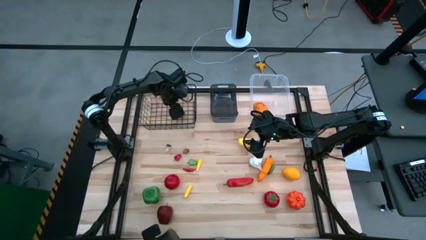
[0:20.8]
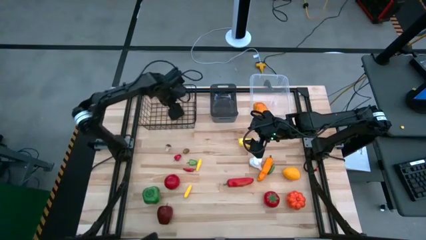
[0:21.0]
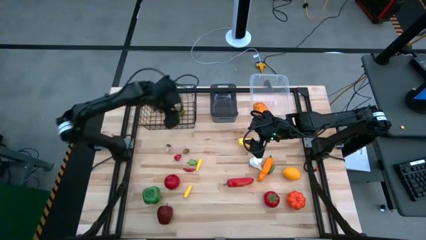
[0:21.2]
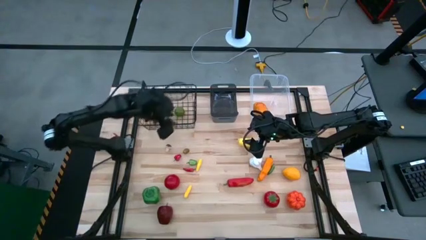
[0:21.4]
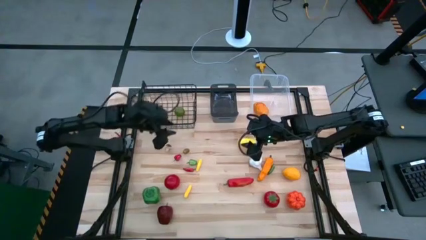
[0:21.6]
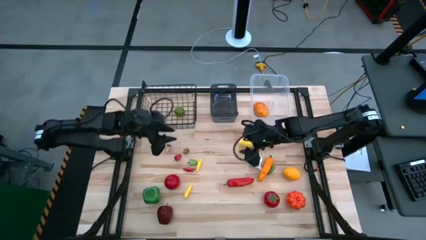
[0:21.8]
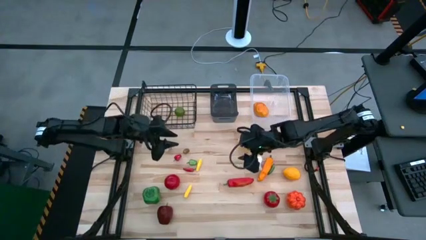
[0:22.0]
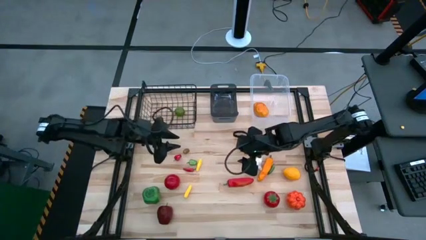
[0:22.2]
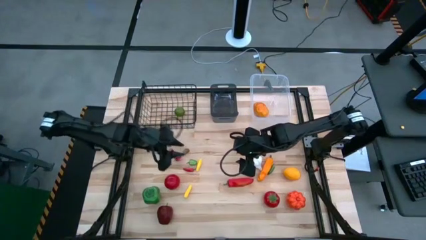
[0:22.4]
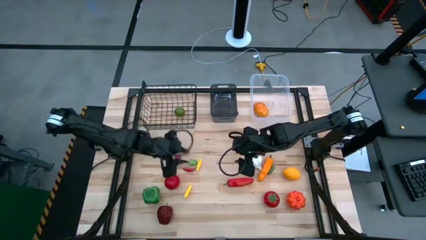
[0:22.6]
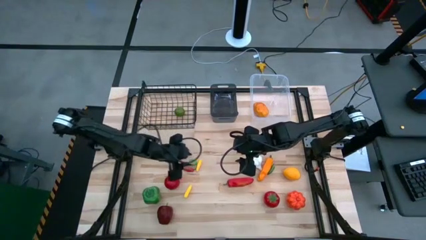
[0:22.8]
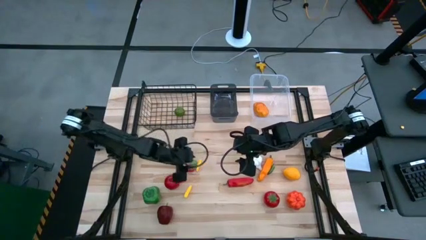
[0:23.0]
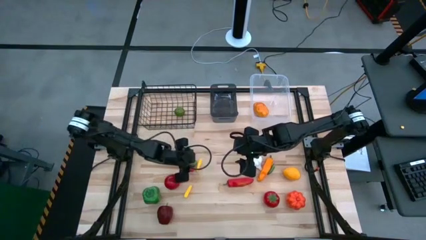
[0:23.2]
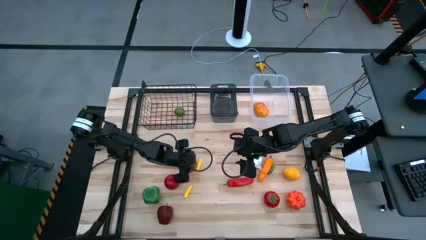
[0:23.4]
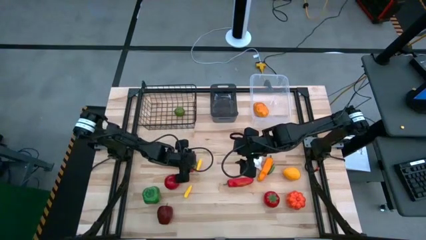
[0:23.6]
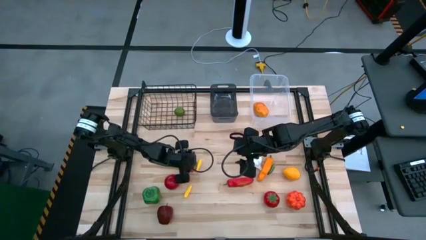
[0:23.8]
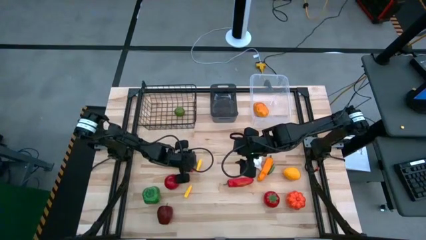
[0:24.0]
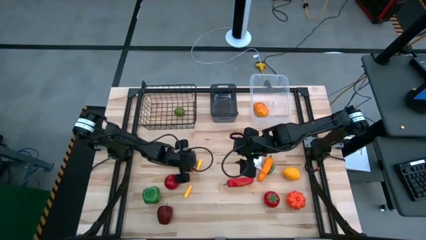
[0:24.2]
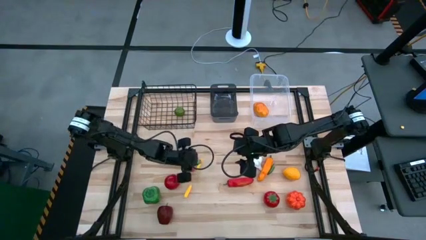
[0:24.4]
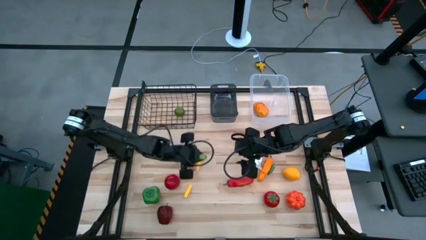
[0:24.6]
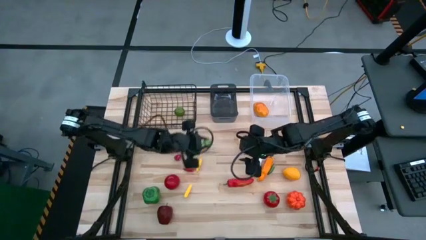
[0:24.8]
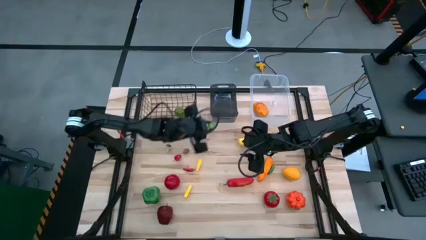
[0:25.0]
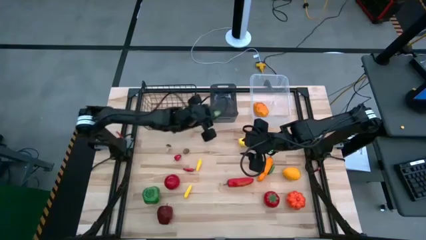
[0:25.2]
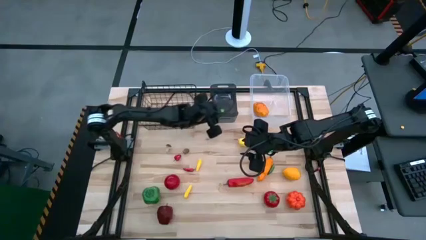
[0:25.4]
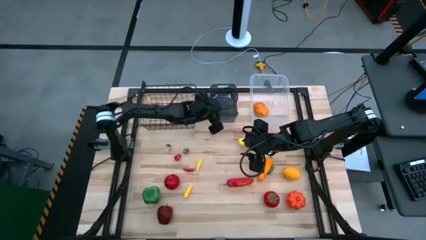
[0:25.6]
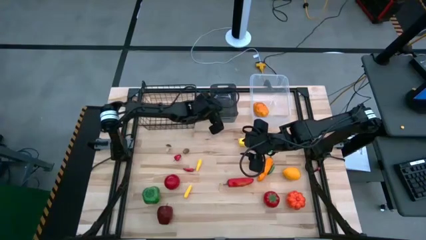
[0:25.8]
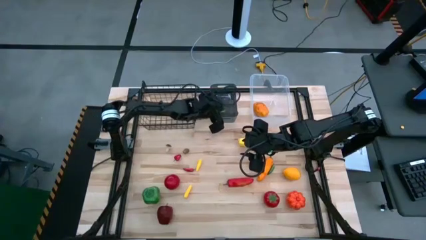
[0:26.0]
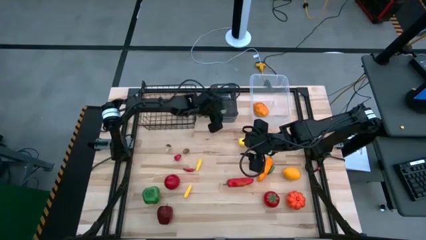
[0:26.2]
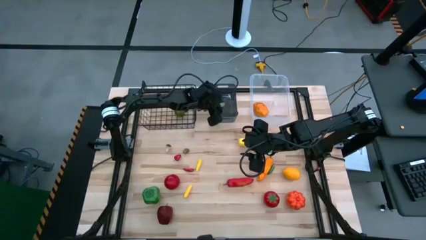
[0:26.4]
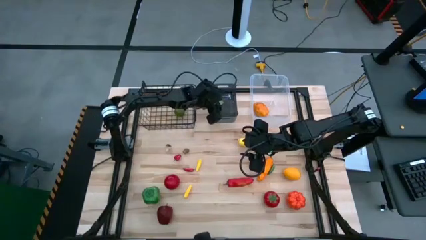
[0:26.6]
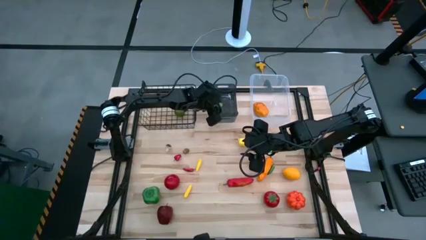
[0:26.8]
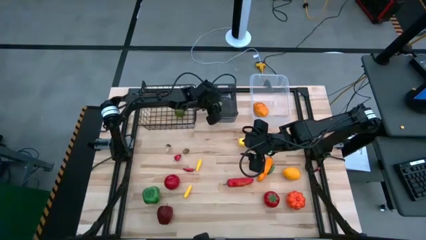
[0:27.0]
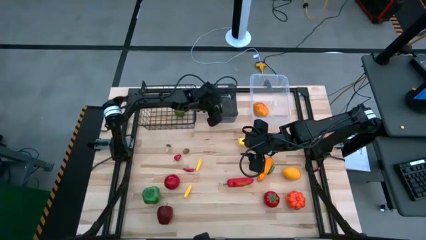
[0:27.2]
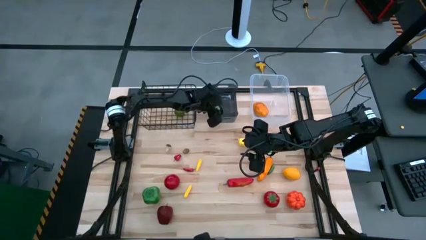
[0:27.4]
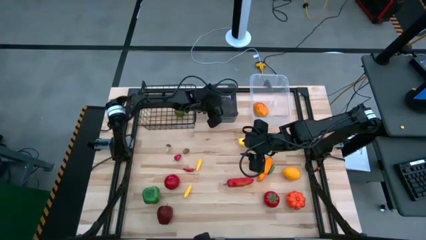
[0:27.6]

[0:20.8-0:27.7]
Task: Sort produce into baskets
Put the small green bell pepper into the black bin

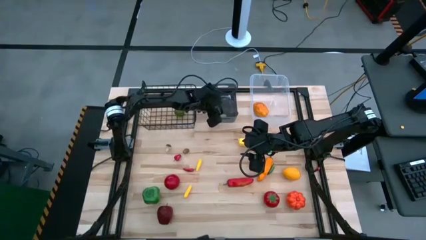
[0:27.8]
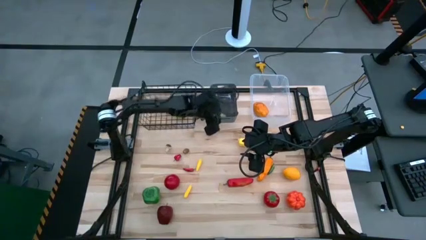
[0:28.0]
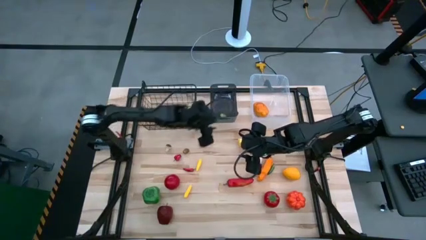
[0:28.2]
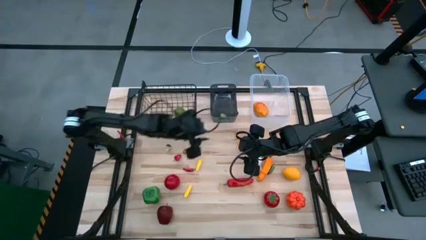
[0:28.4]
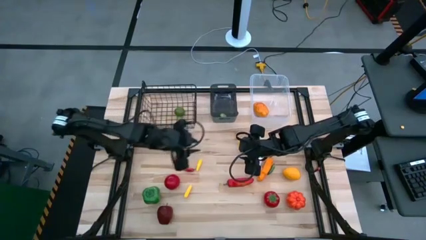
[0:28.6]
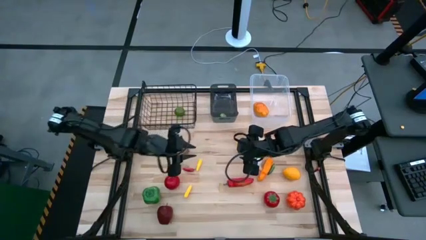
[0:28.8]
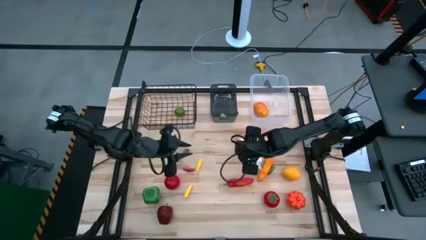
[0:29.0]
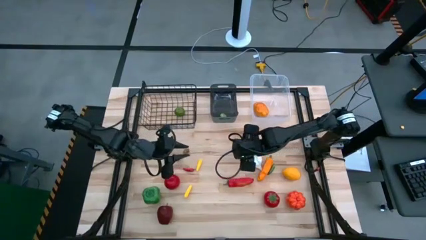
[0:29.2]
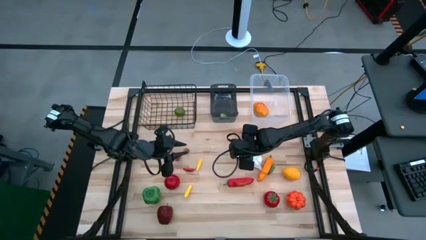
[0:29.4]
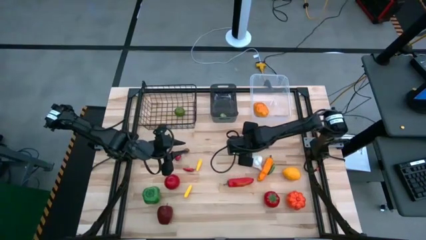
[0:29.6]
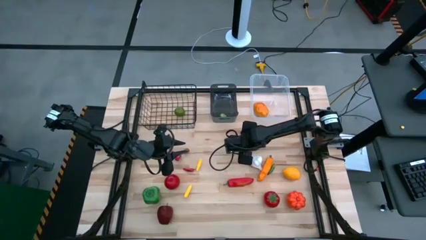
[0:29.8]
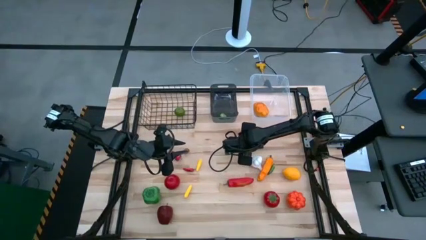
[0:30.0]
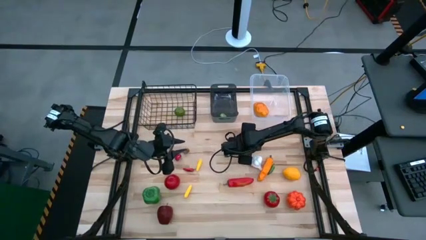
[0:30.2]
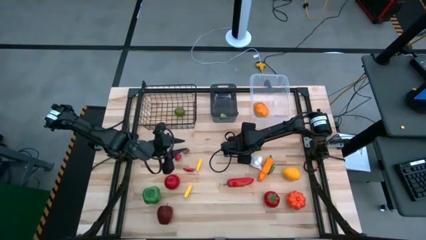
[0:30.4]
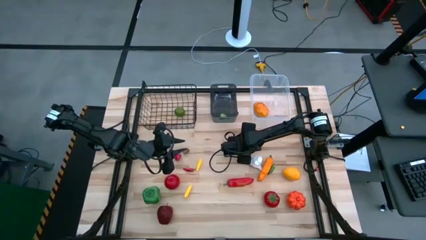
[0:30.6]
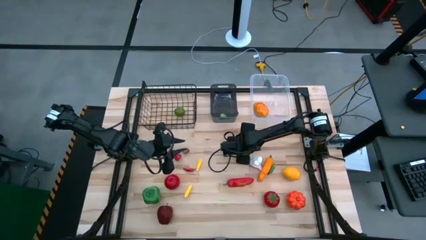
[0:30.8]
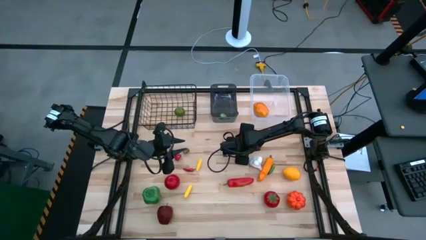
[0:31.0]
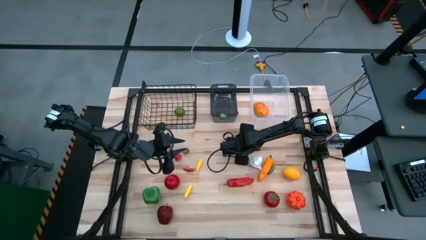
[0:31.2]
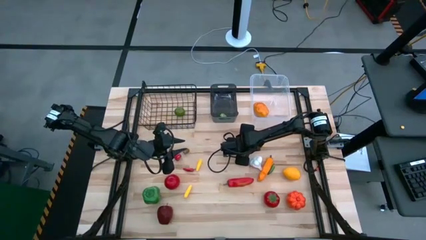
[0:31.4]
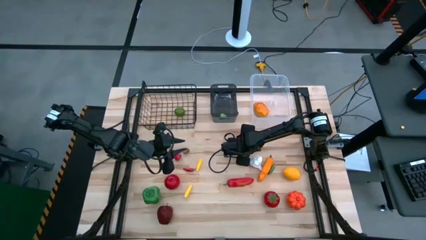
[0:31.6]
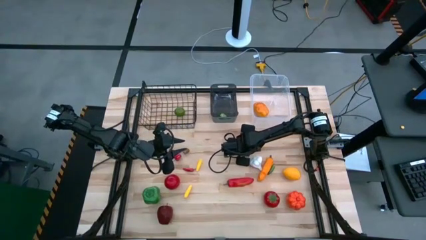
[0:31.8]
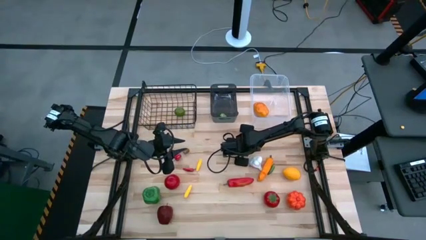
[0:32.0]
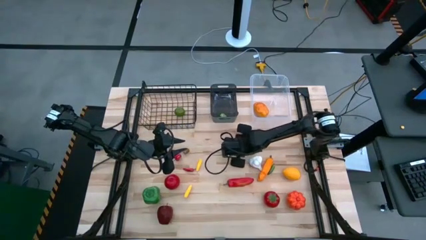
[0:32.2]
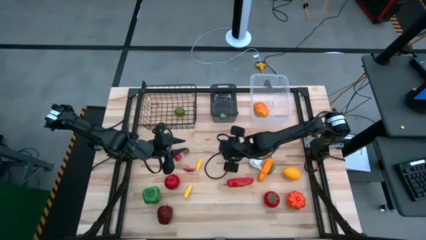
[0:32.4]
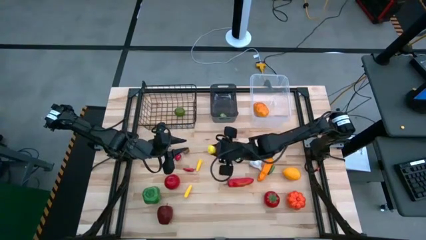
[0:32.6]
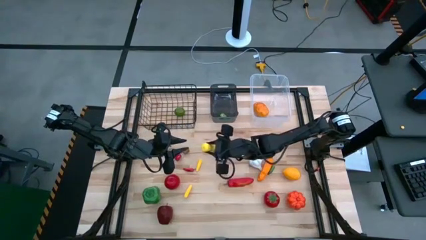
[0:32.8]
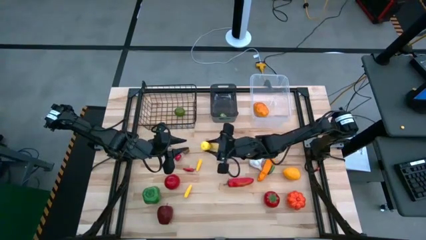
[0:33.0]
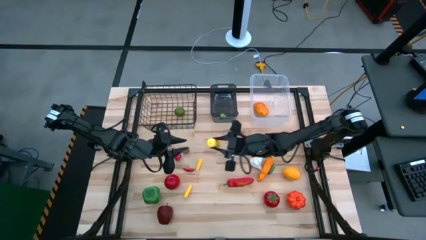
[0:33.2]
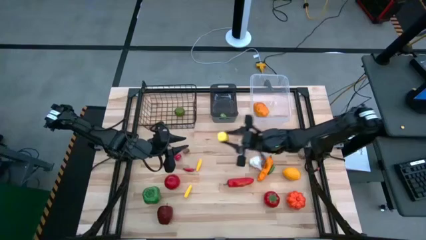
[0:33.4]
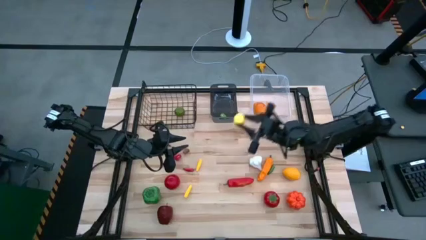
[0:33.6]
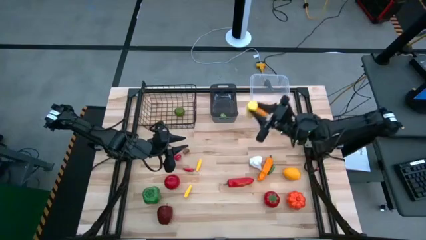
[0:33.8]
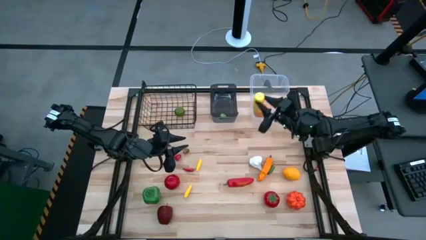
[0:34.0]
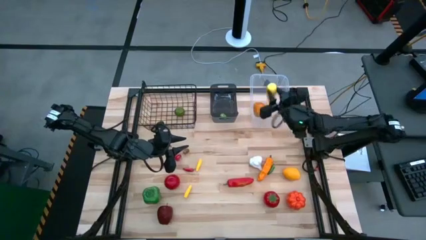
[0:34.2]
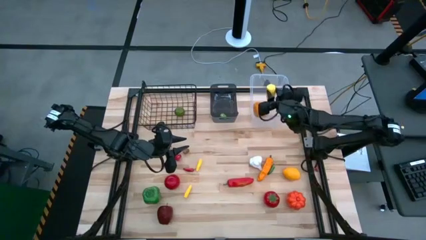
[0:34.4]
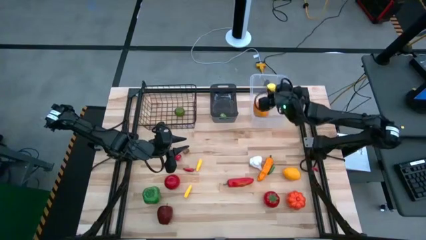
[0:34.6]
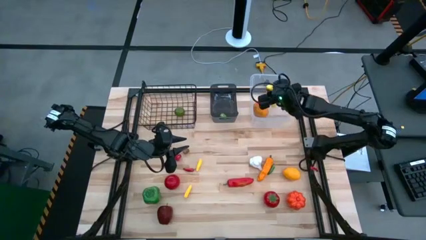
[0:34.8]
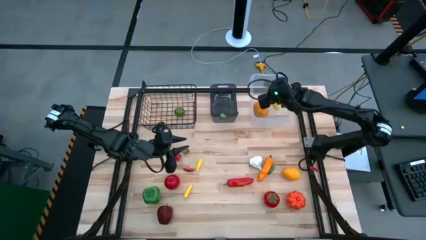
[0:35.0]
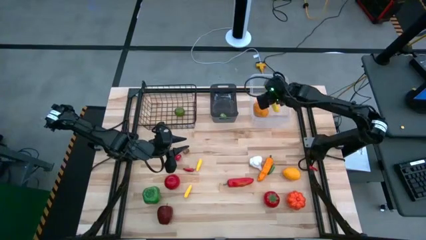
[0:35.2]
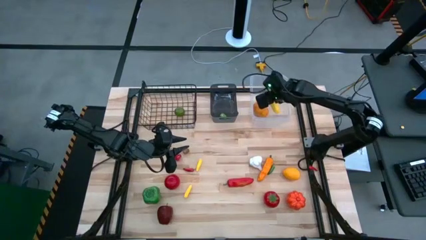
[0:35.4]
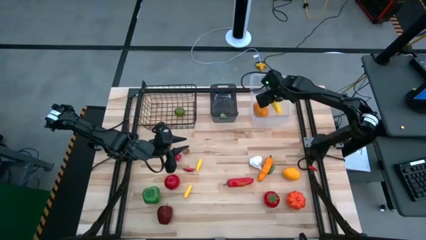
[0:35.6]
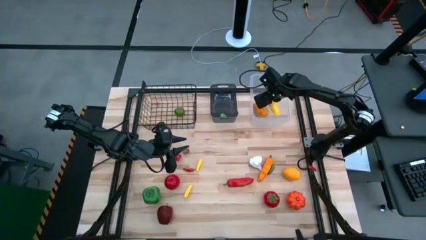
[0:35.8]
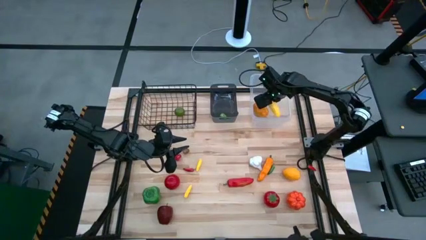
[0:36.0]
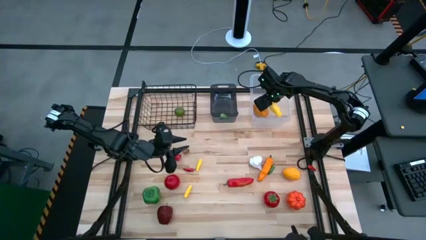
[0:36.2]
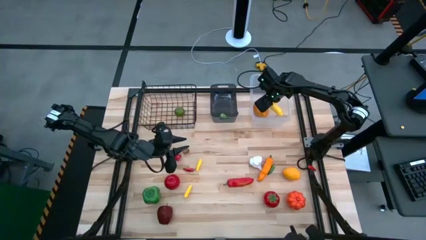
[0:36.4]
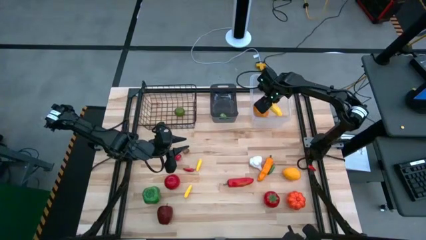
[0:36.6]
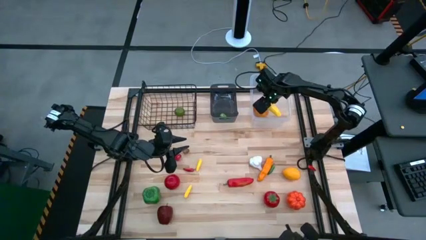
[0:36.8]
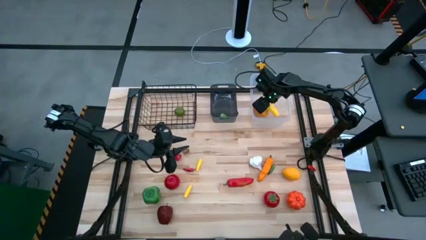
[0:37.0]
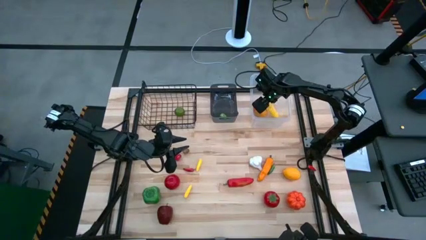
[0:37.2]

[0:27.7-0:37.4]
Put the corn into the transparent bin
